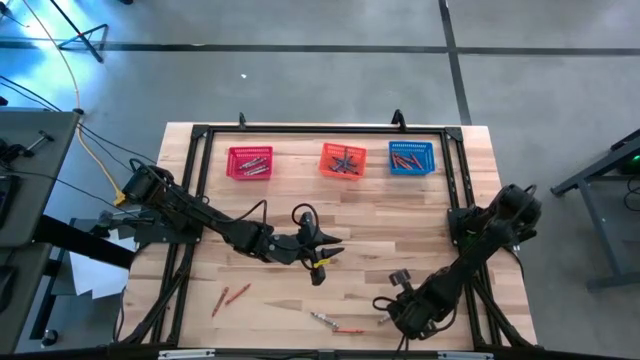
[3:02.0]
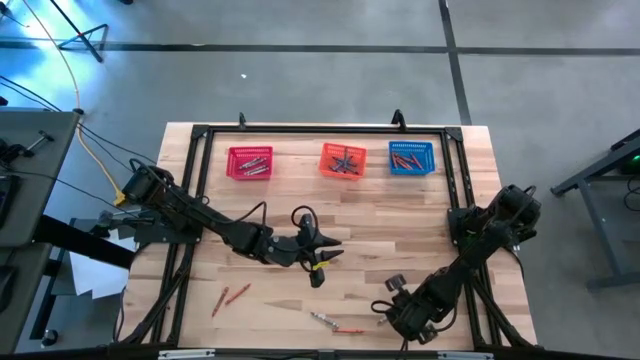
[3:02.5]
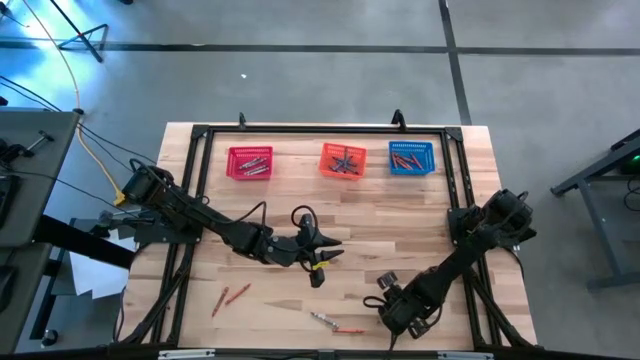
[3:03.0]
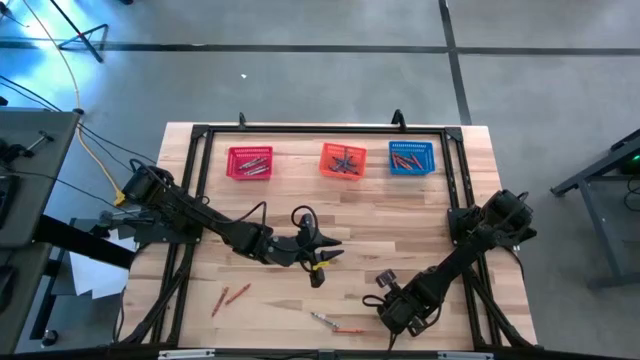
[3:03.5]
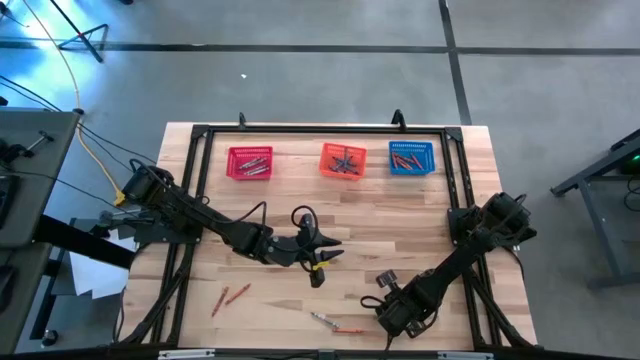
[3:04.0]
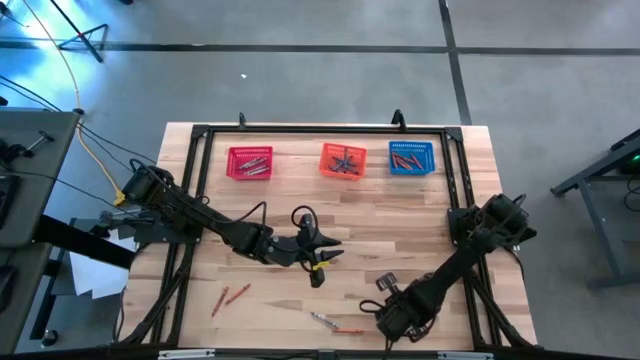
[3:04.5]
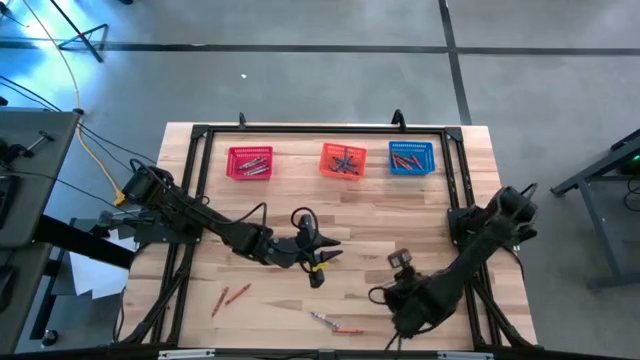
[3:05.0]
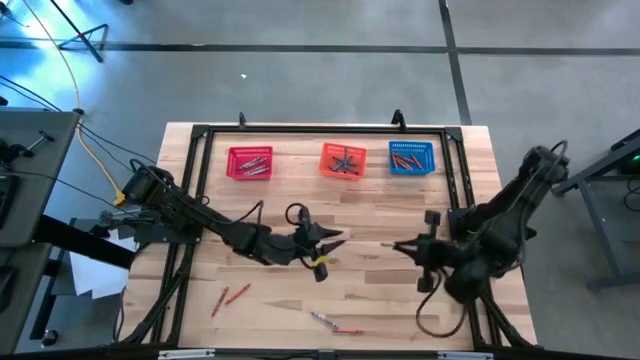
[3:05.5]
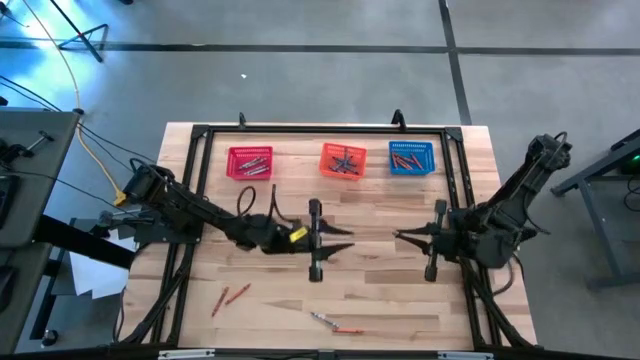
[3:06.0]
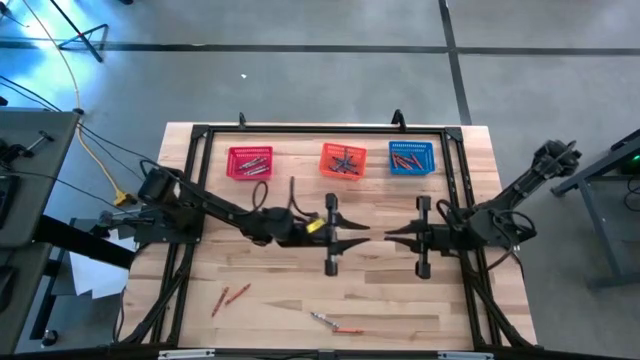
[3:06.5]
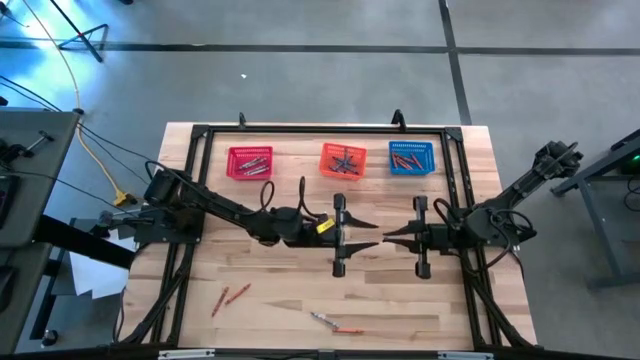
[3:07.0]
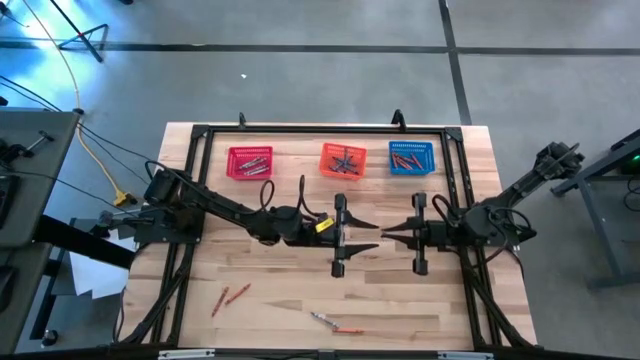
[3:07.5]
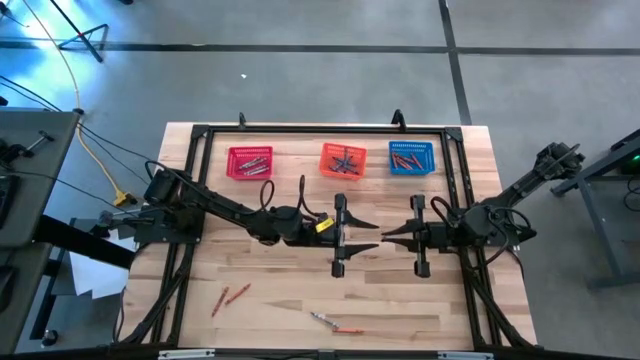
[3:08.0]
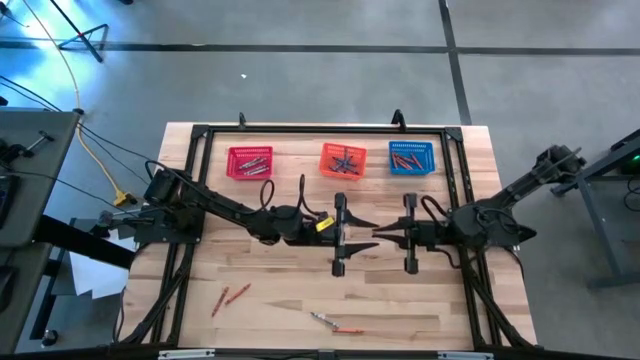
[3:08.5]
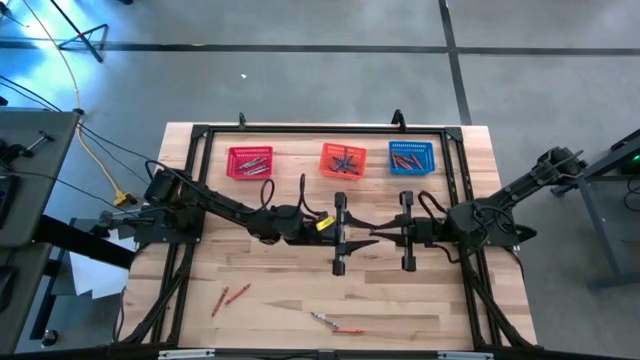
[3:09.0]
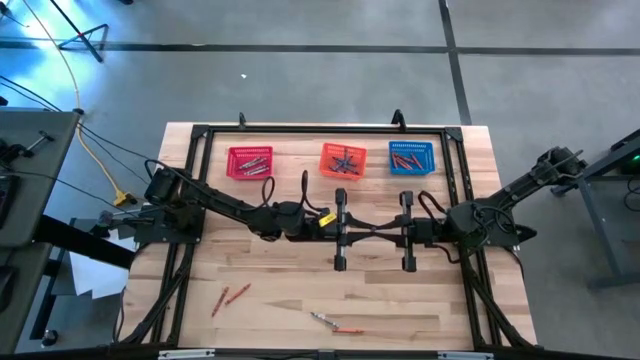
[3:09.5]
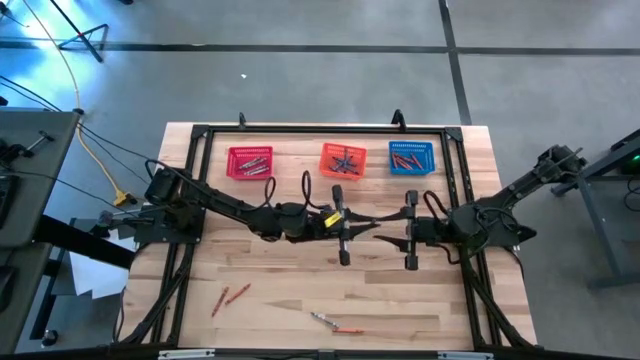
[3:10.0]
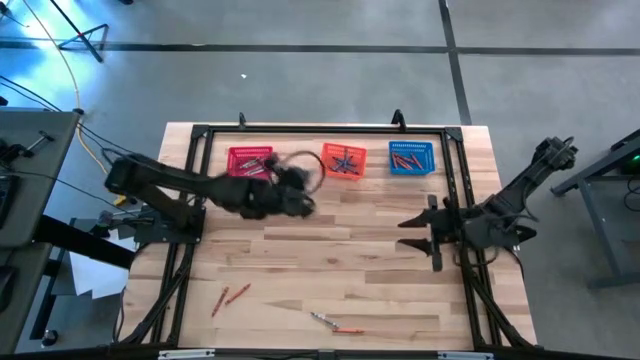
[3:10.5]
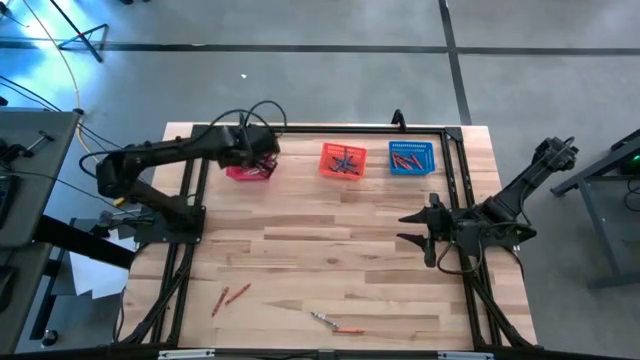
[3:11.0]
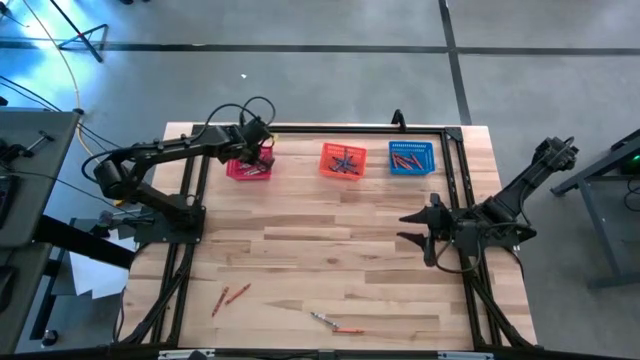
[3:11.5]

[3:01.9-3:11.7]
Task: Sort crayons
Put the gray crayon into the red bin

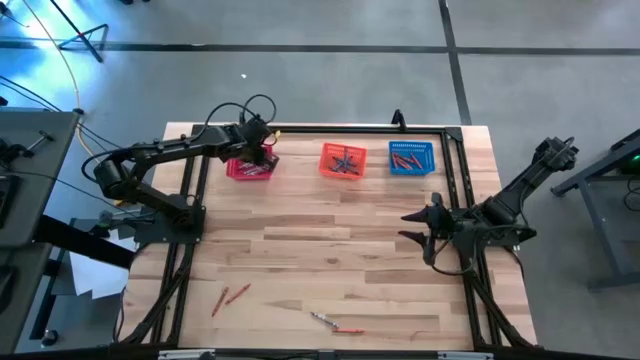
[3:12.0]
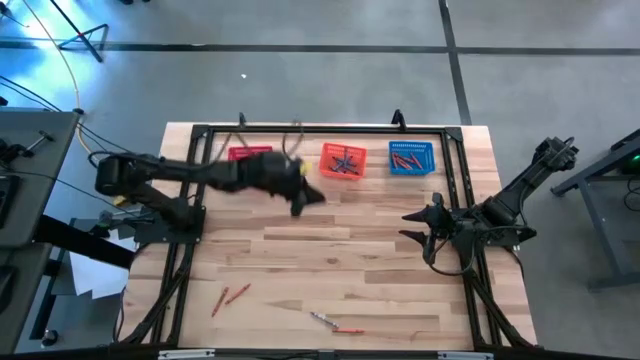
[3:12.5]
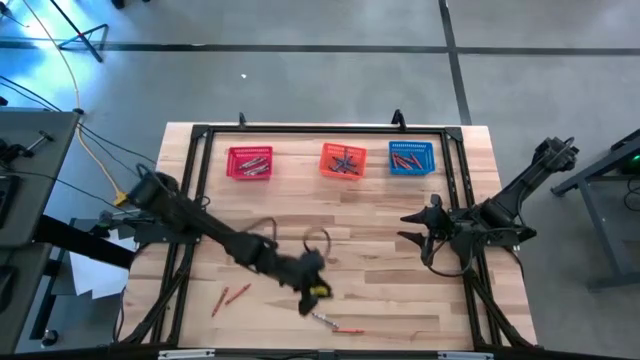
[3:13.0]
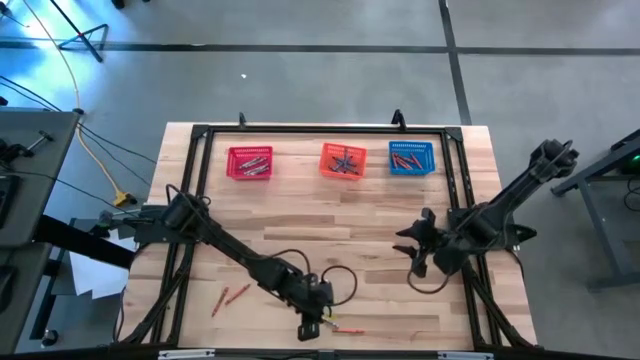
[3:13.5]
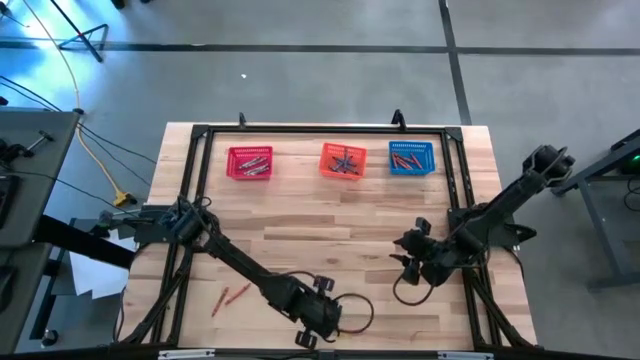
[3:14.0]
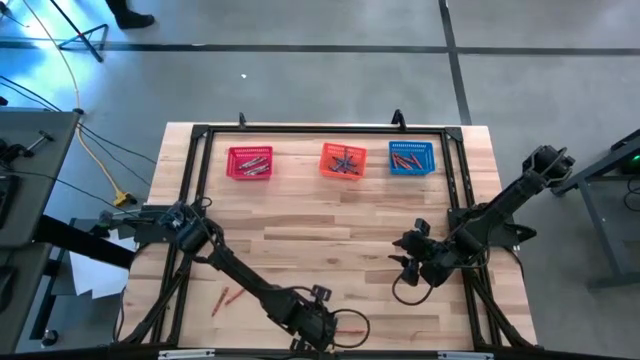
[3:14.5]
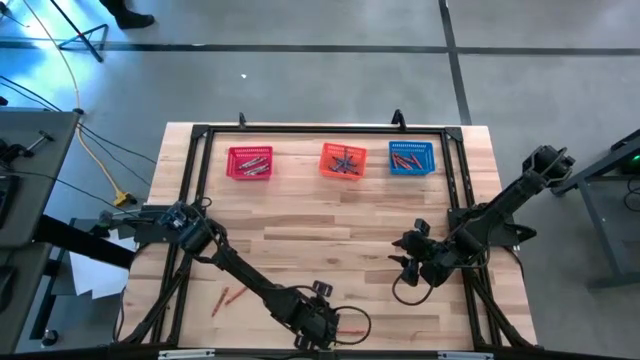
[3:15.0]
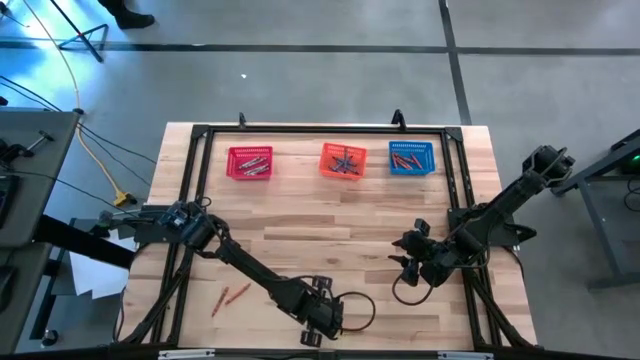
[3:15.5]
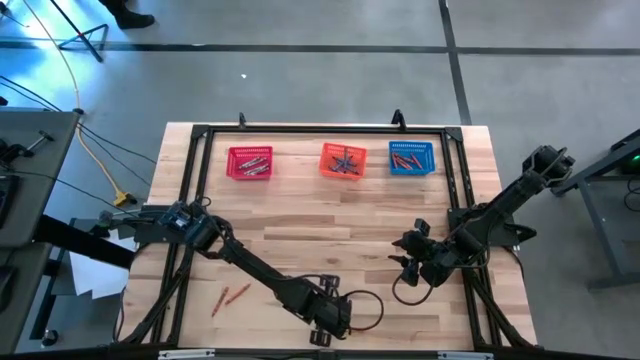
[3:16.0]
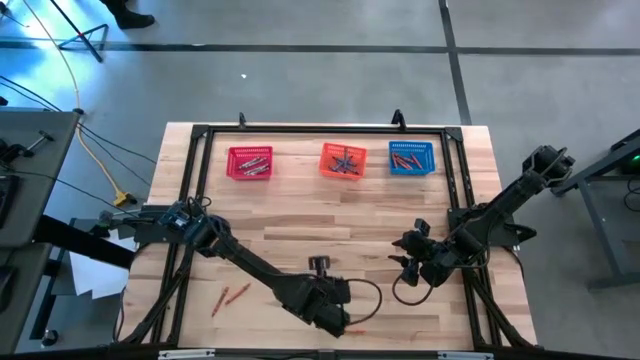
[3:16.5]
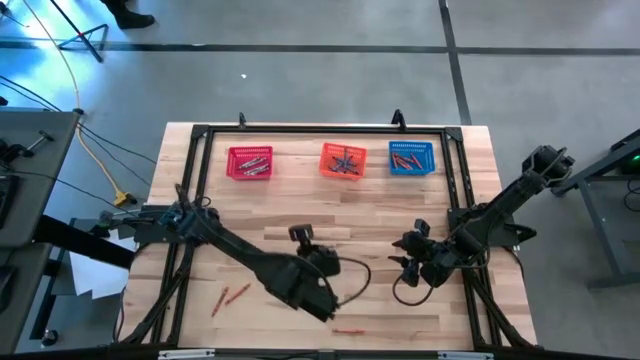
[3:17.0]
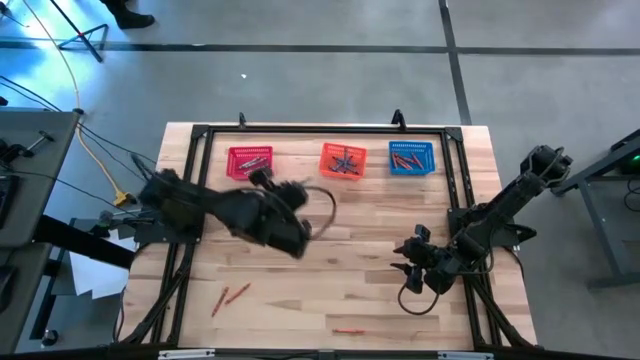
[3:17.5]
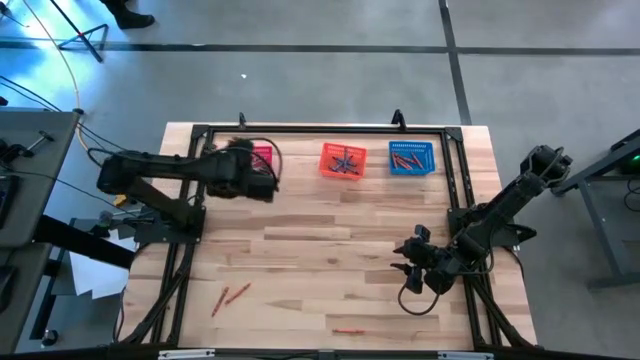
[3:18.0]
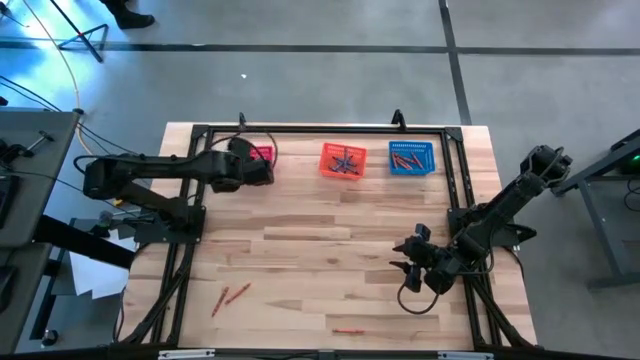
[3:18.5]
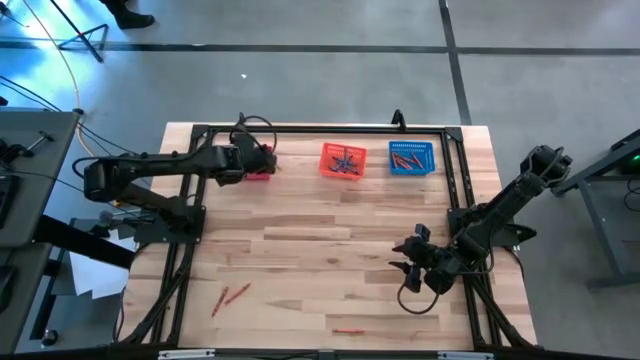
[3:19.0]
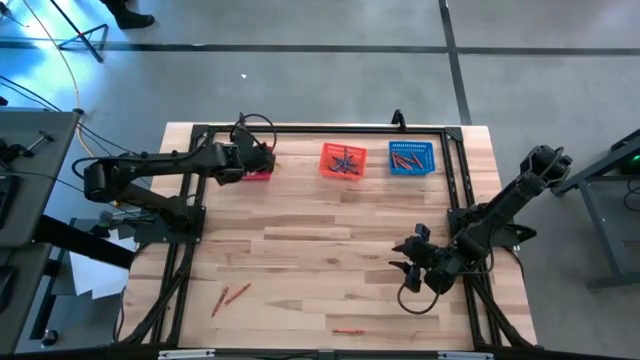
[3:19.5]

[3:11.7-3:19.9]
Put the gray crayon into the red bin
